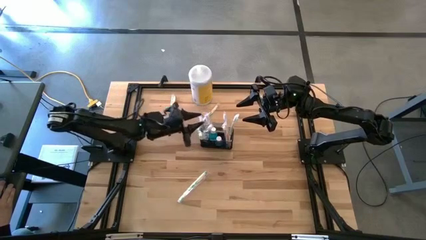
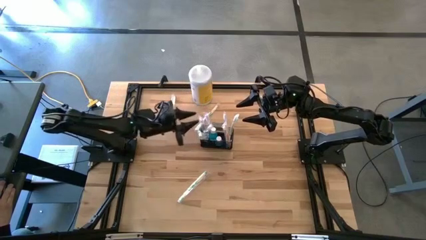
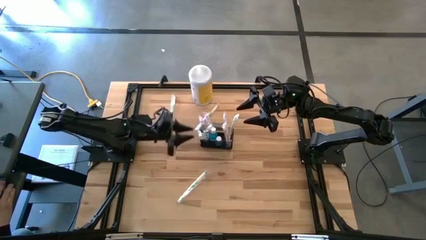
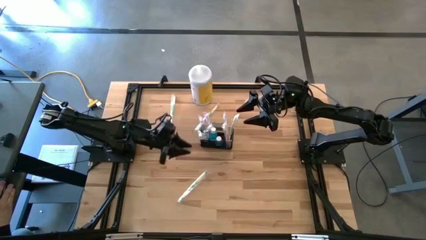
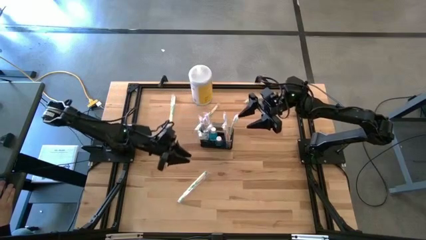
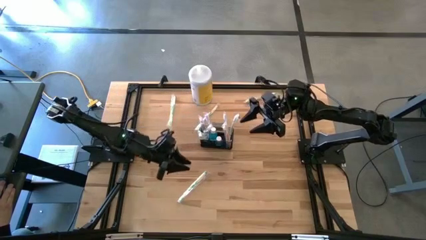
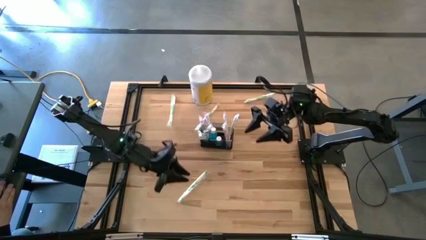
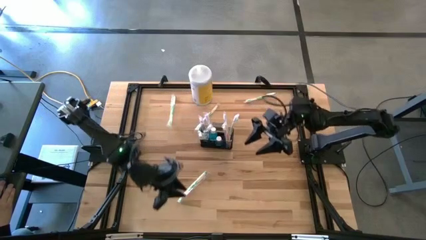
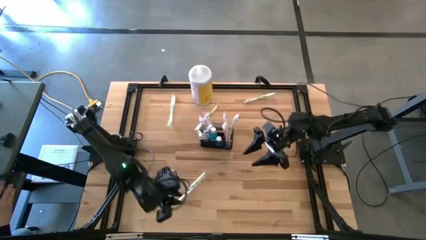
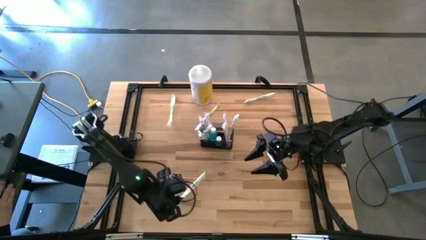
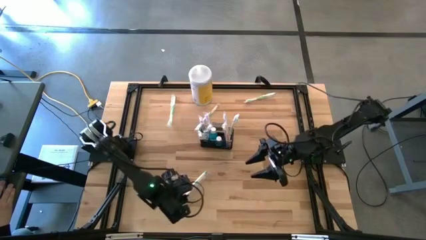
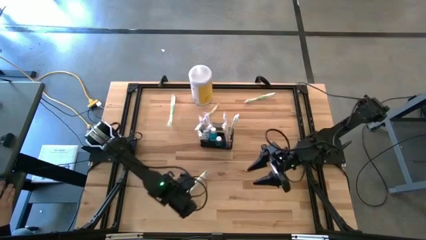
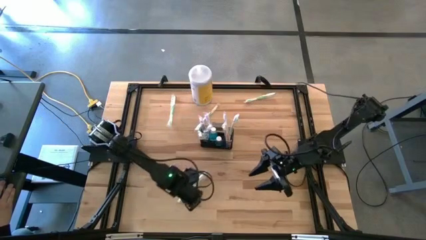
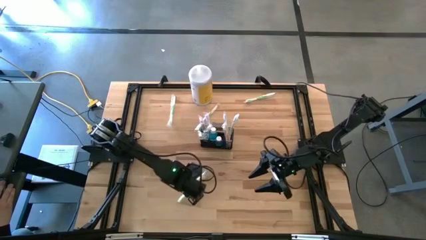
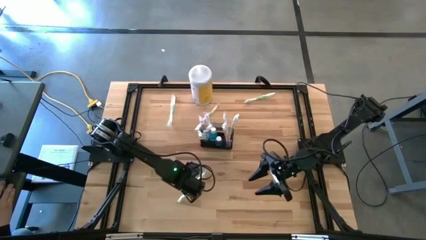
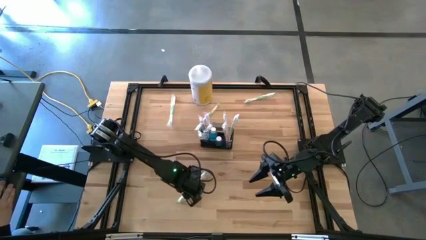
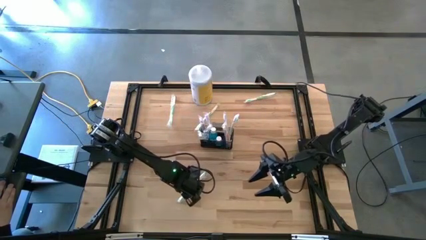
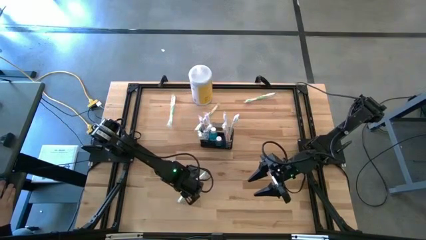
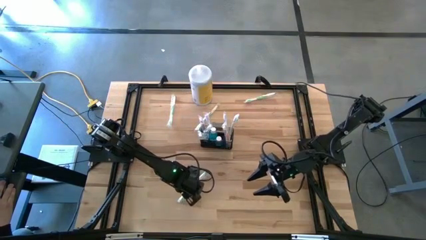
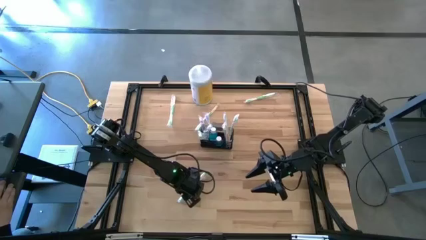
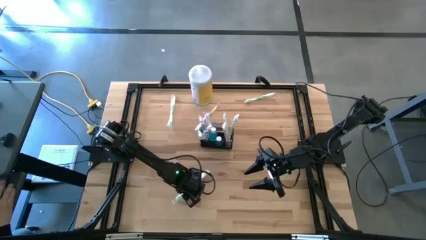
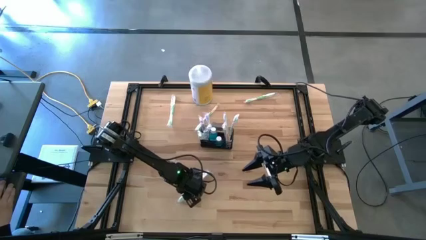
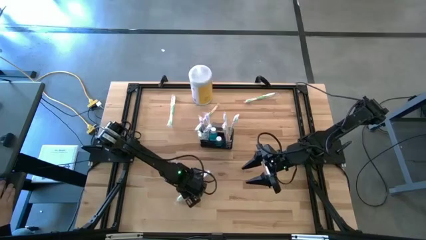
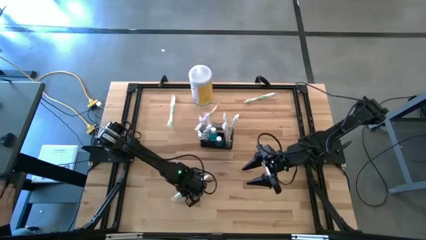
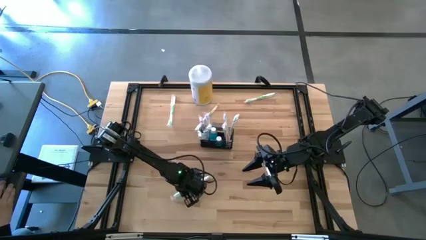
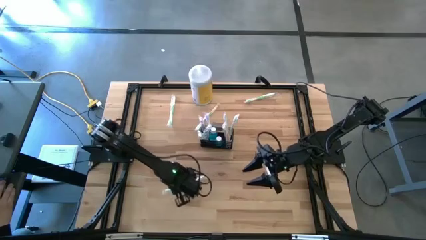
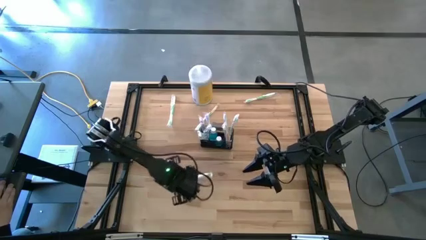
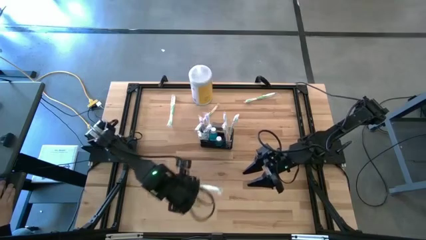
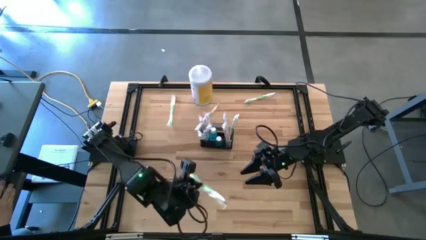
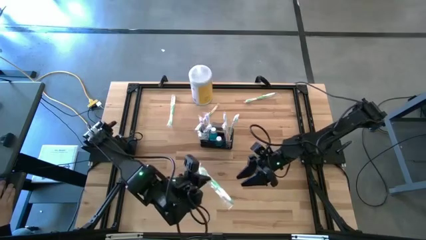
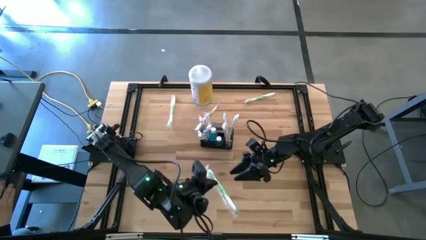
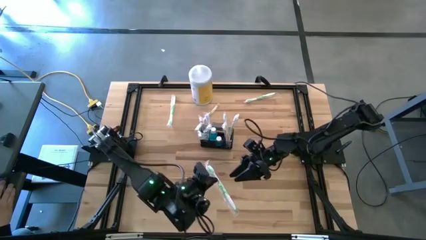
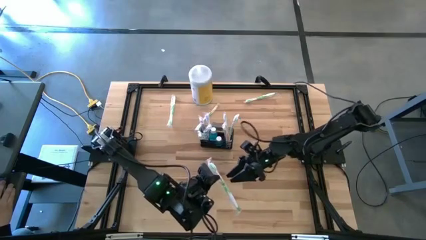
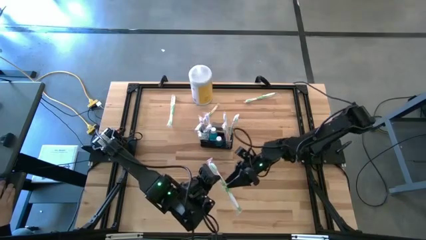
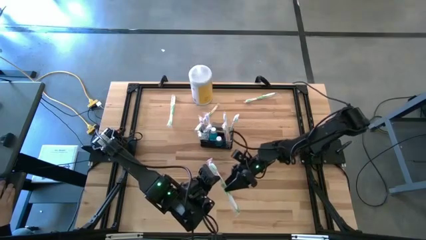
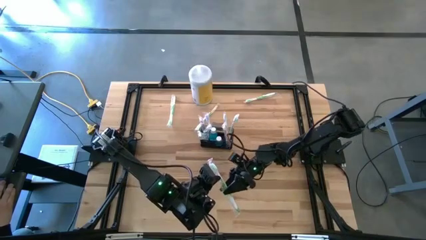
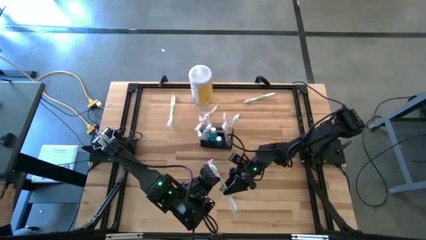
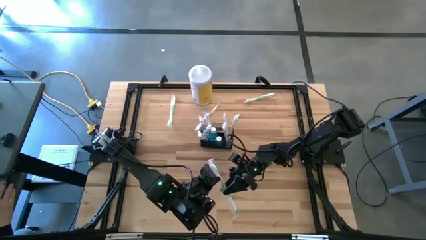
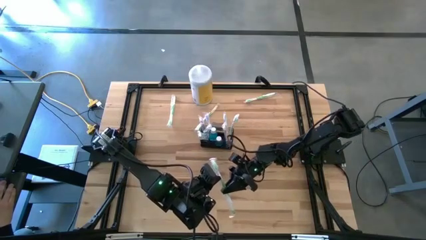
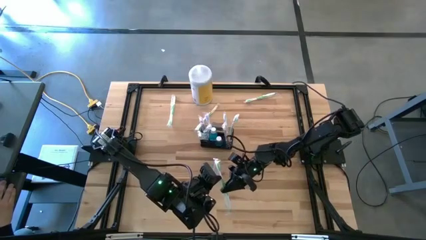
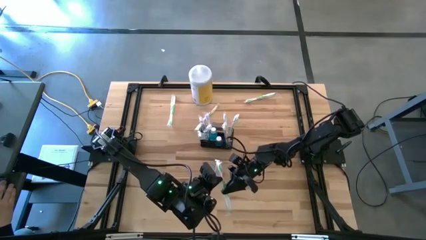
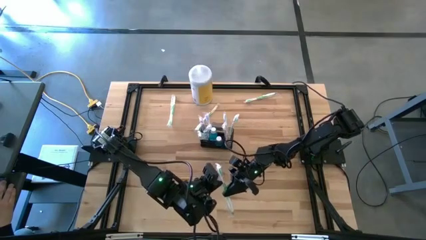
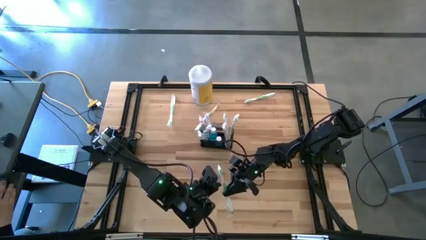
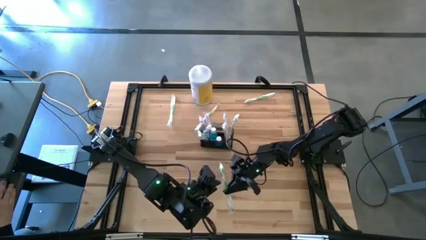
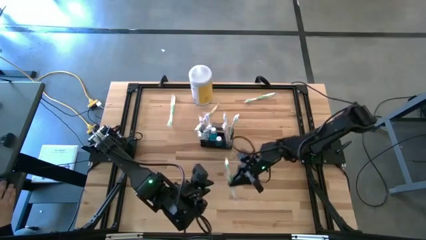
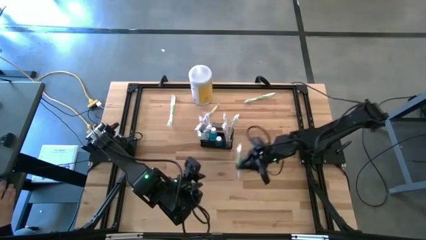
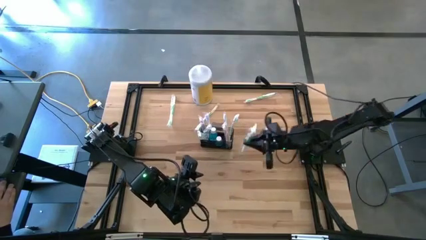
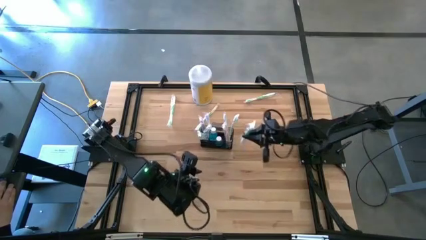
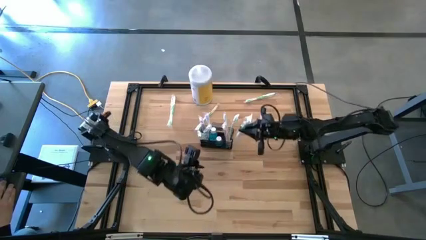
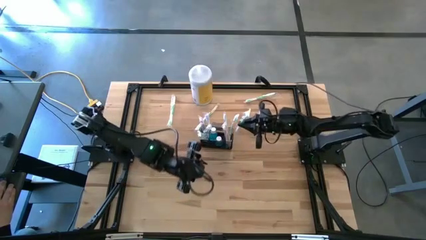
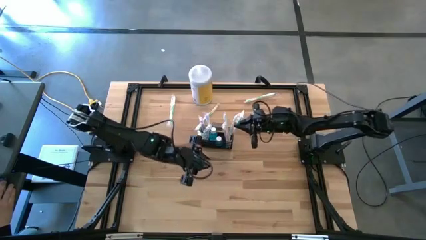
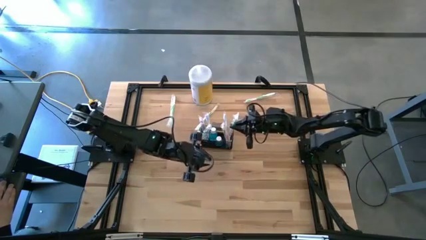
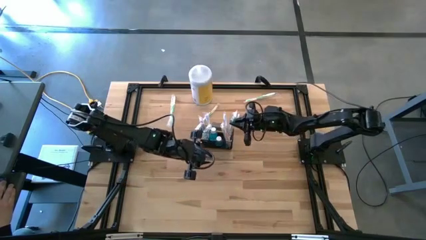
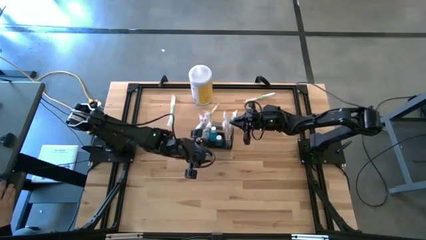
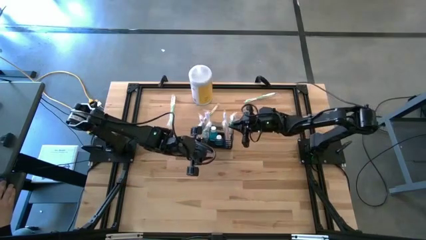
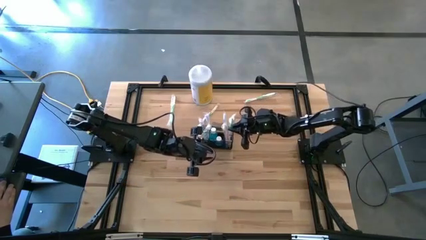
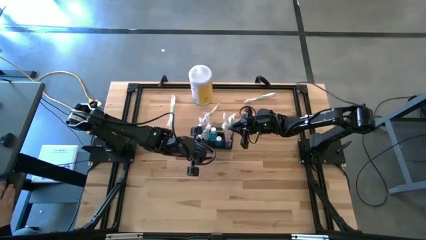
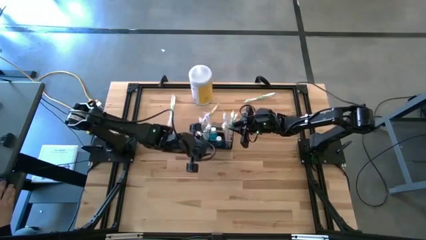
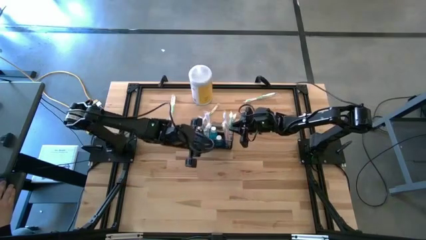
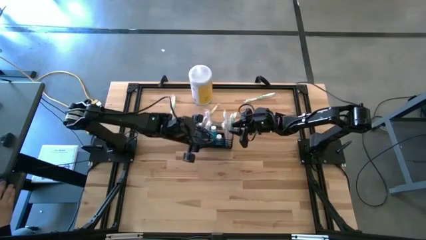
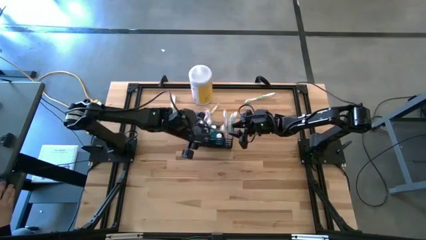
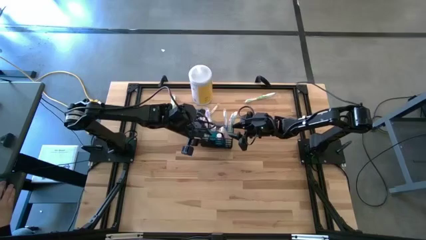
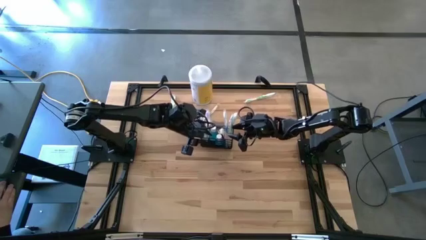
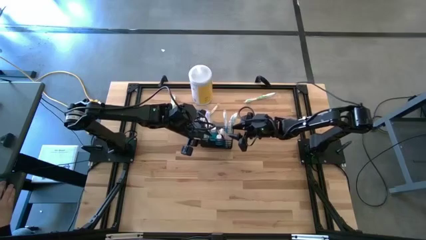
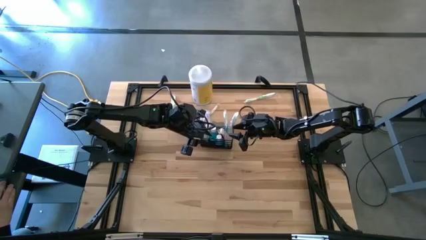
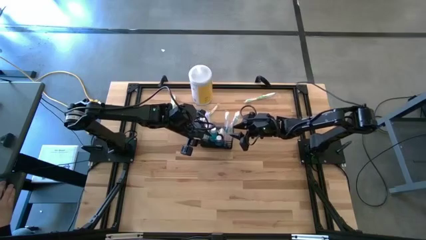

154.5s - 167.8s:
Task: Pick & Place toothbrushing station
Put the bottom green toothbrush into the right section wire organizer

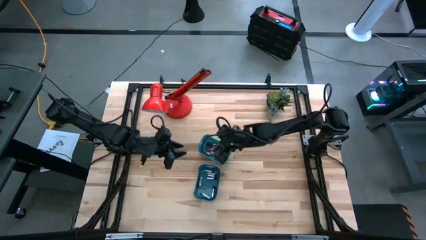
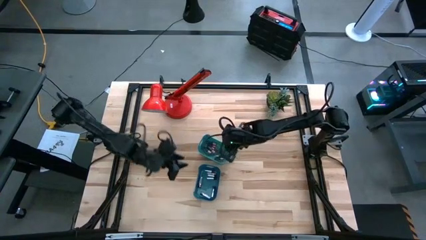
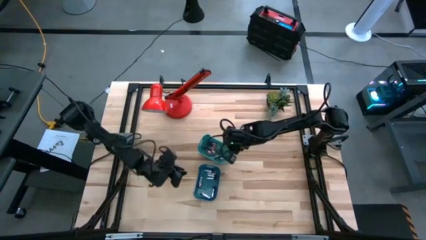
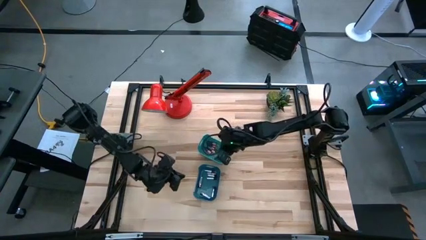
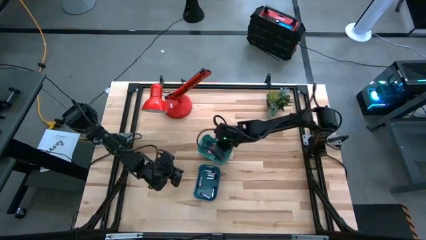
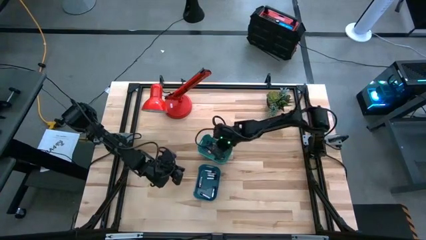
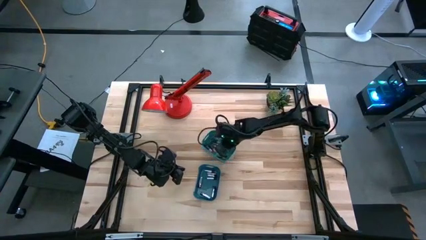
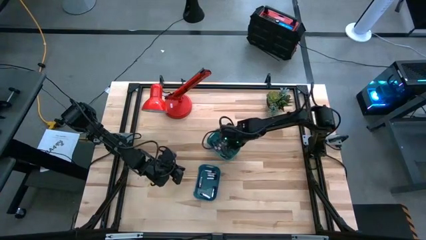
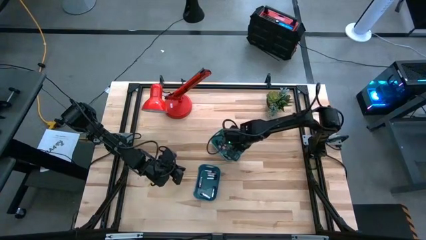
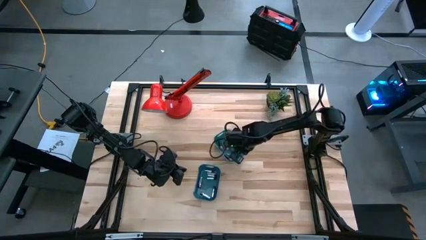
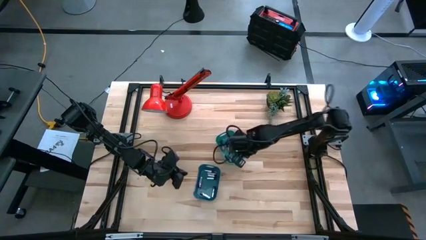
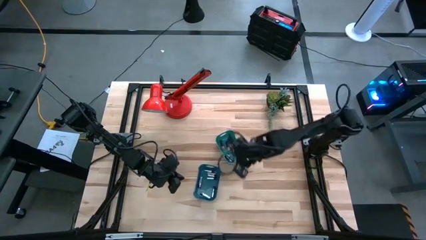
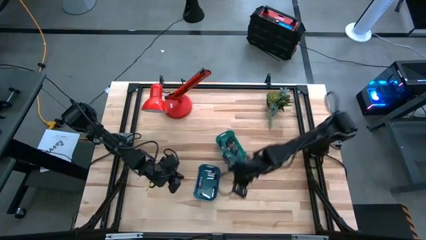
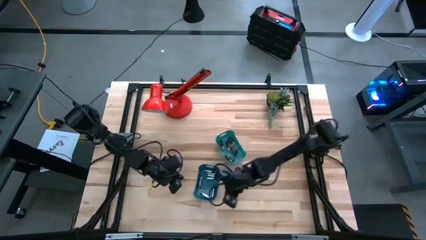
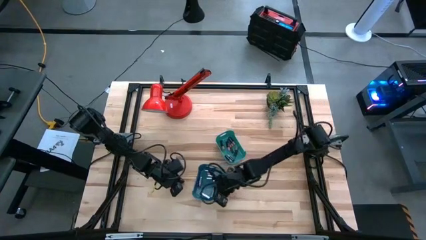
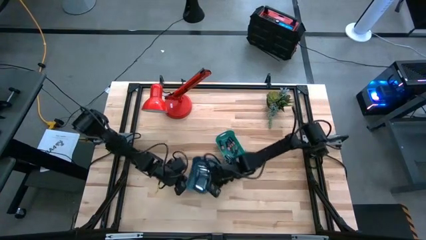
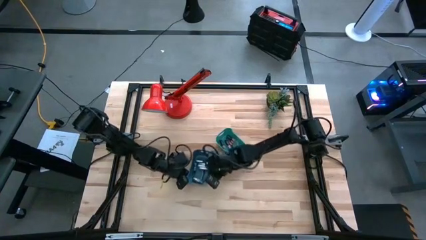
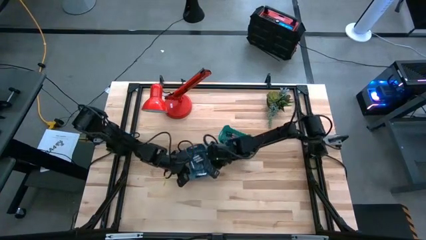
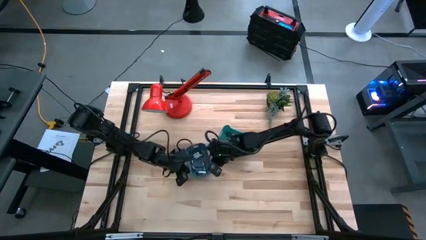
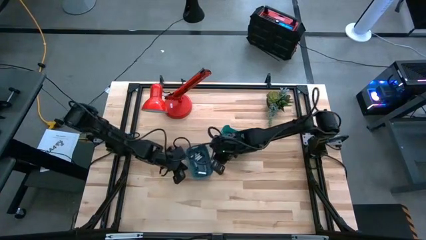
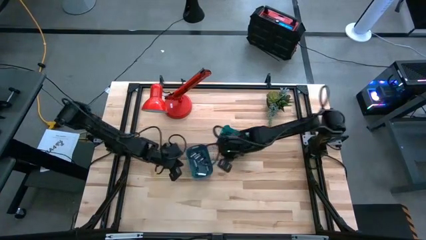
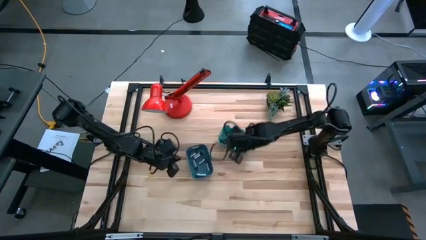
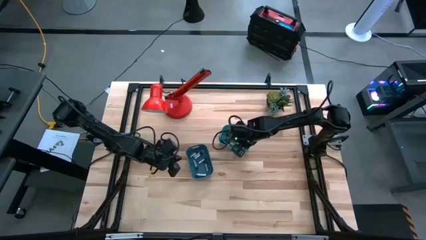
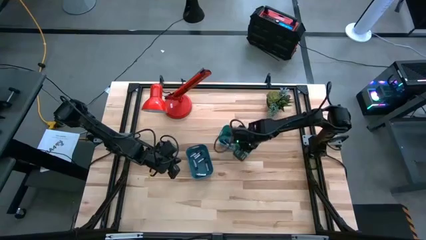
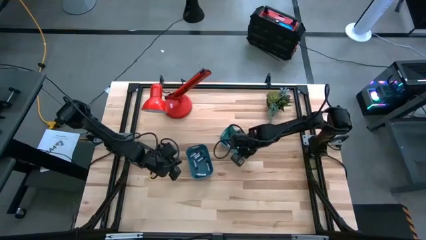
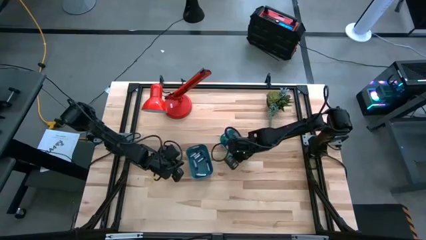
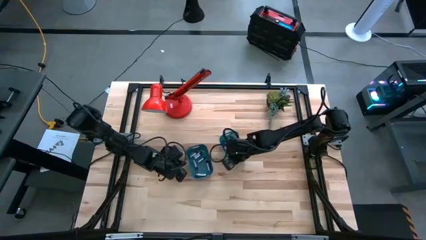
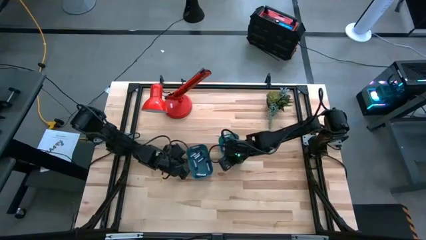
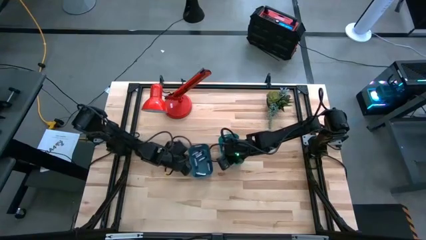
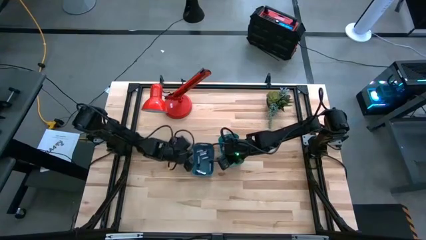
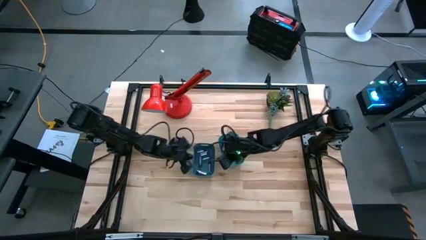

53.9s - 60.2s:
Task: Sort batteries
Adjust the bins and align them on the table
